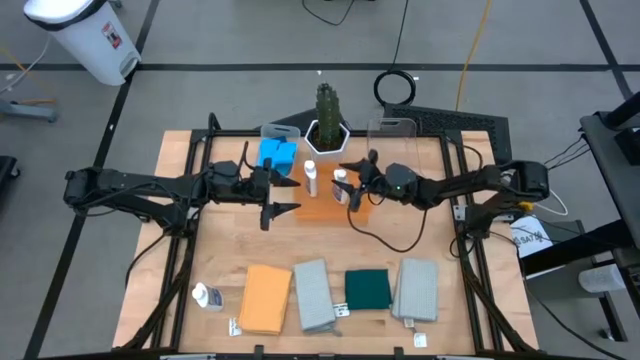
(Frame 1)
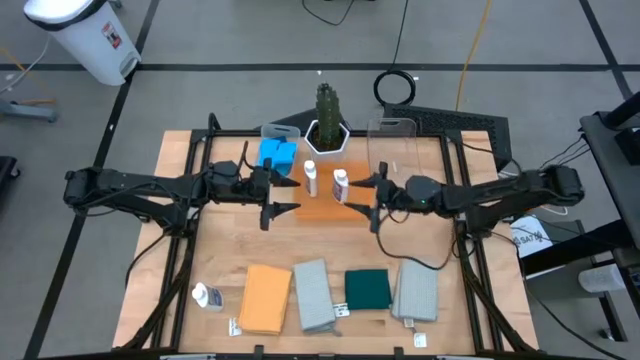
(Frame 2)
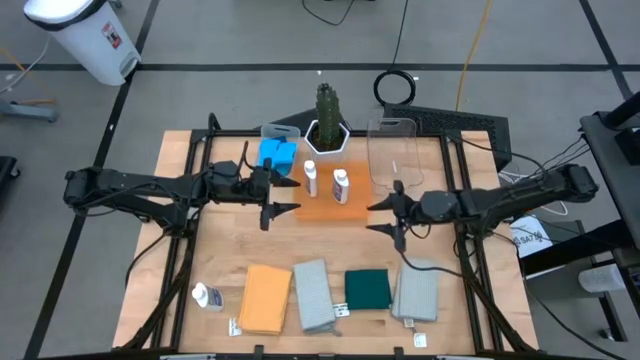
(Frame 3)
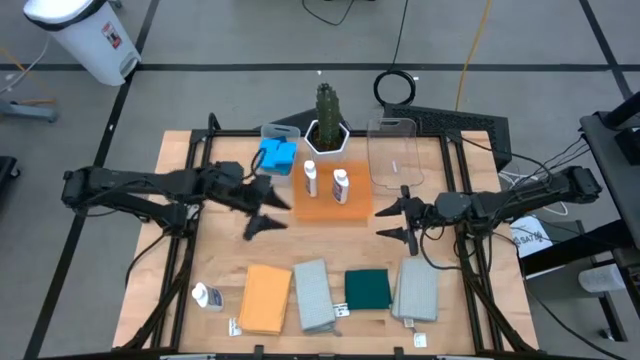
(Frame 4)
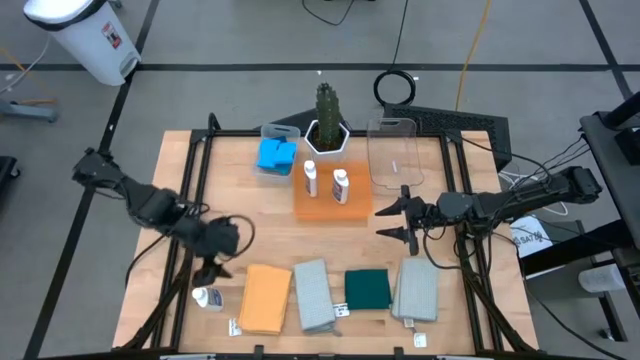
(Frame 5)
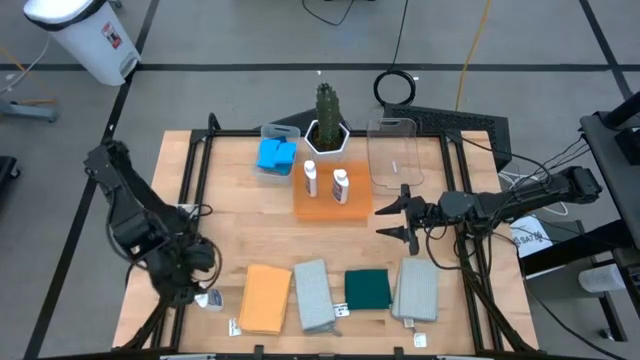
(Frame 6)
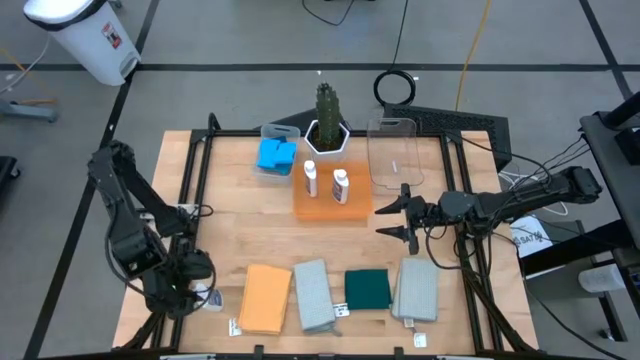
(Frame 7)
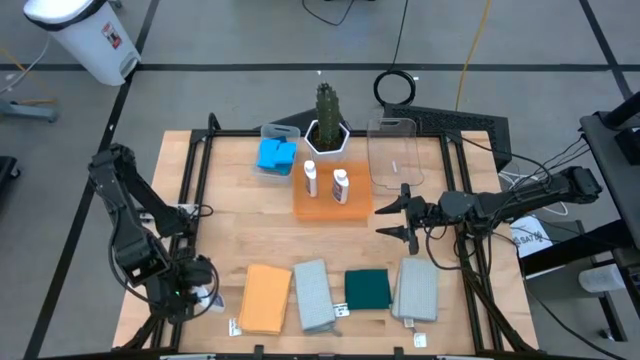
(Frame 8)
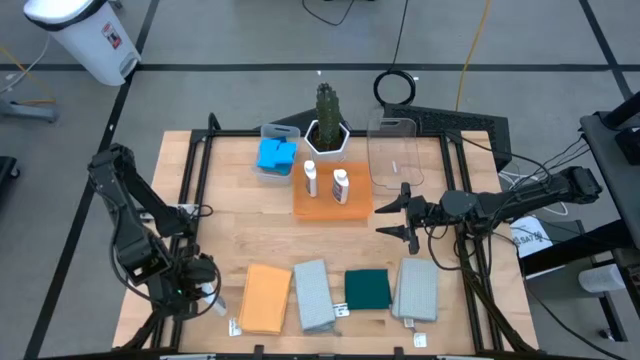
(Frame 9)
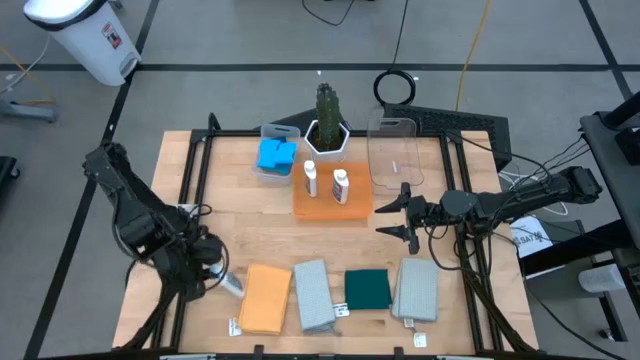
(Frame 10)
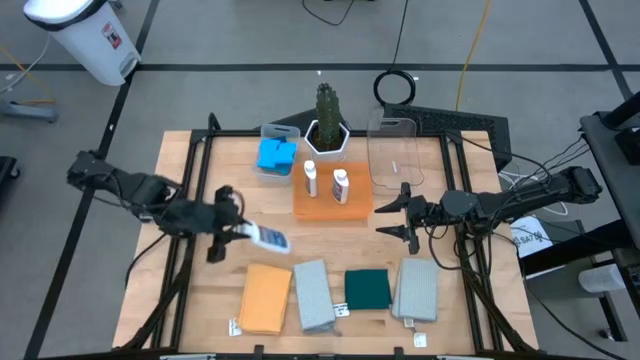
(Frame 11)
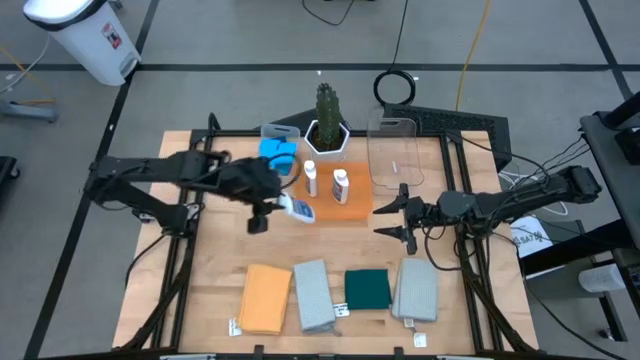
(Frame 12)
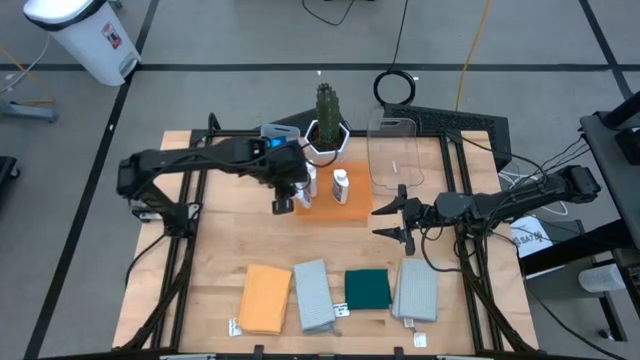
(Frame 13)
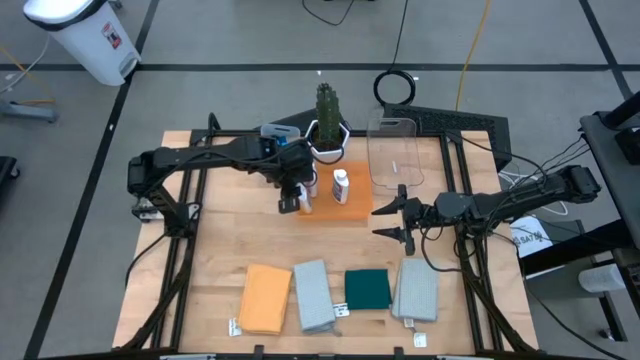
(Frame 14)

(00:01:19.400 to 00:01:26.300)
Task: Pick & Place Kitchen Items
Put the white plastic restorer bottle into the orange bin

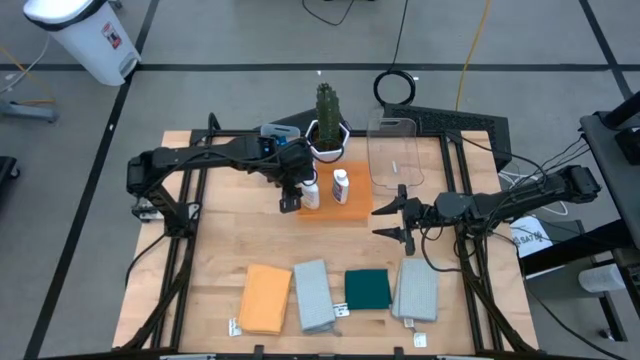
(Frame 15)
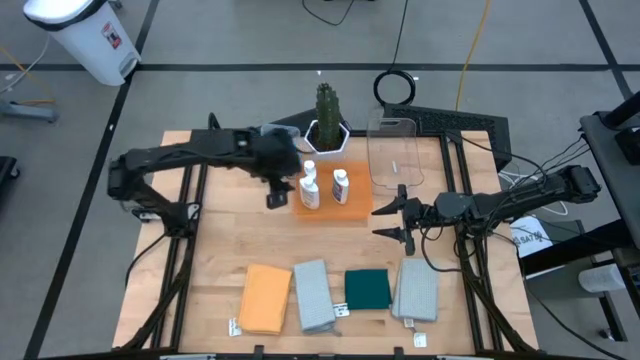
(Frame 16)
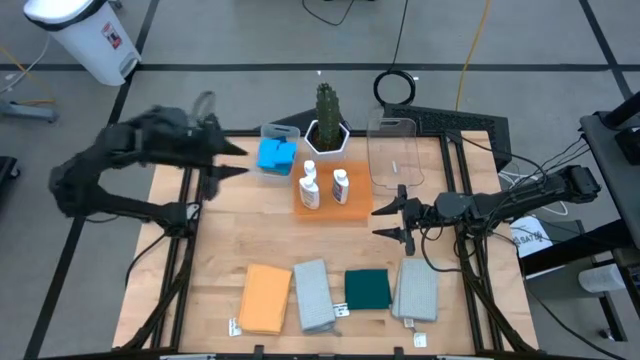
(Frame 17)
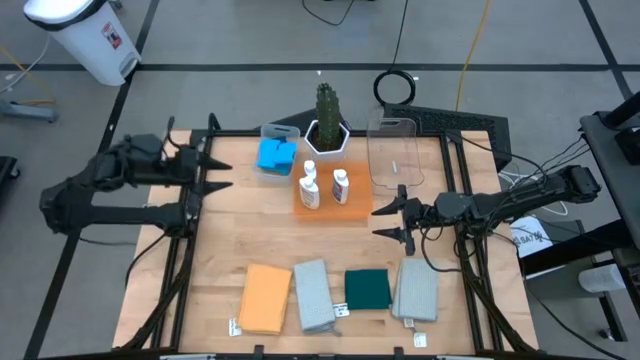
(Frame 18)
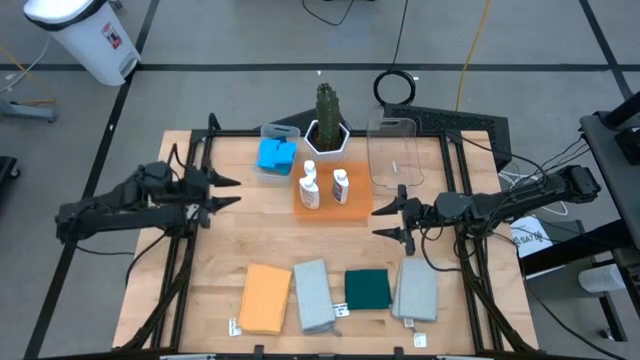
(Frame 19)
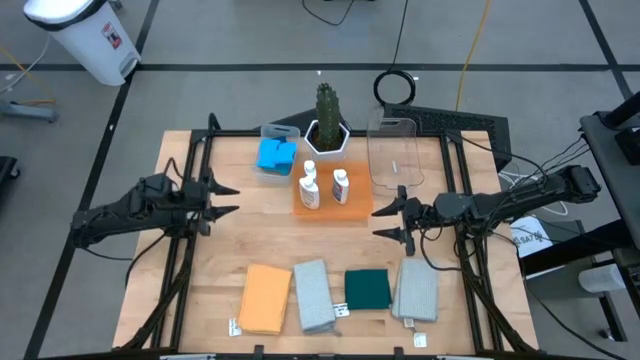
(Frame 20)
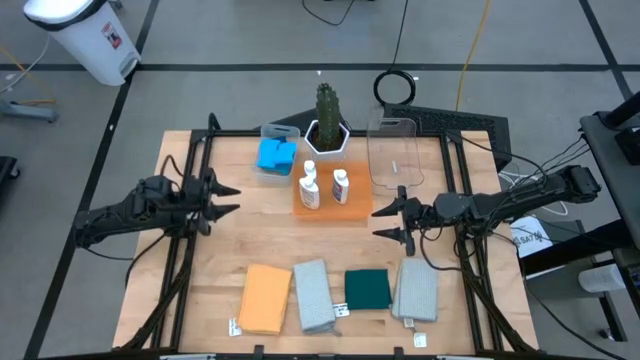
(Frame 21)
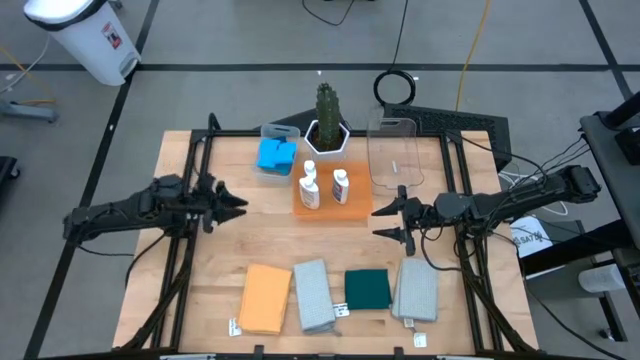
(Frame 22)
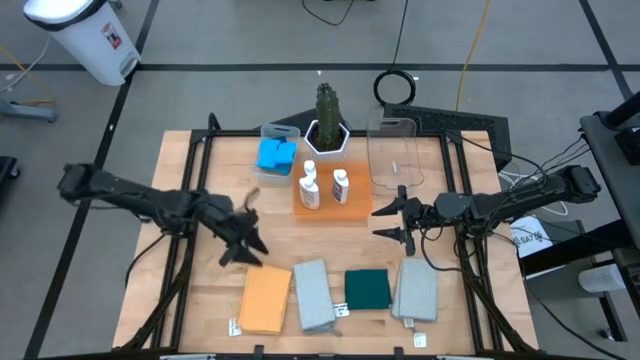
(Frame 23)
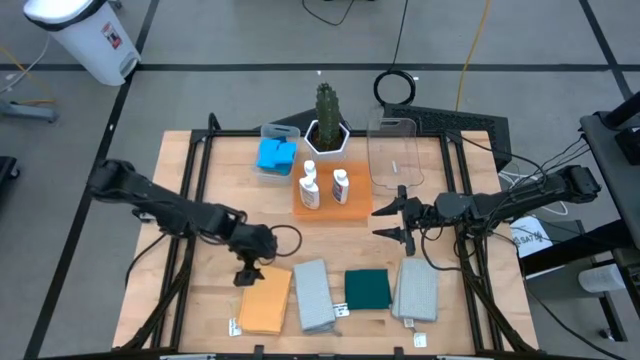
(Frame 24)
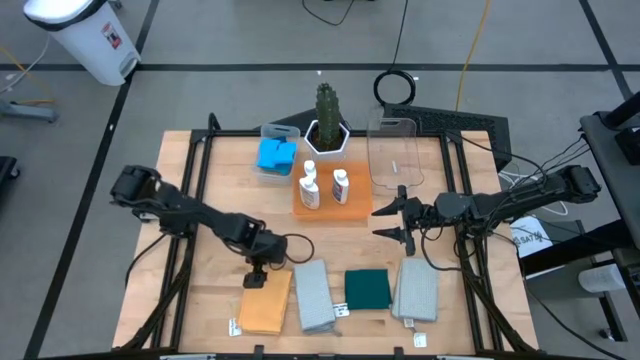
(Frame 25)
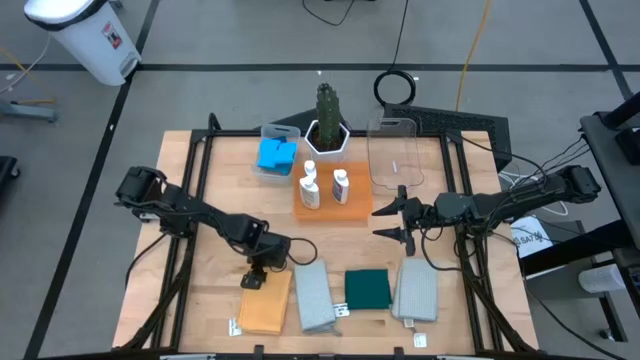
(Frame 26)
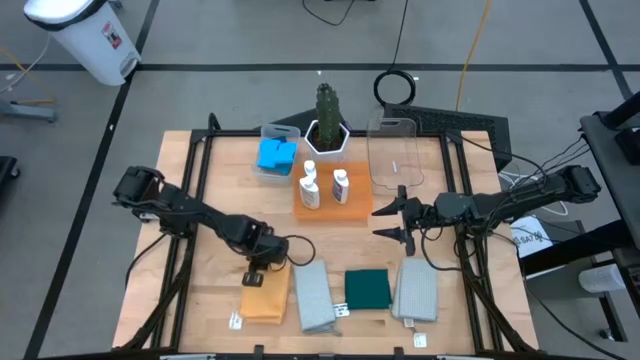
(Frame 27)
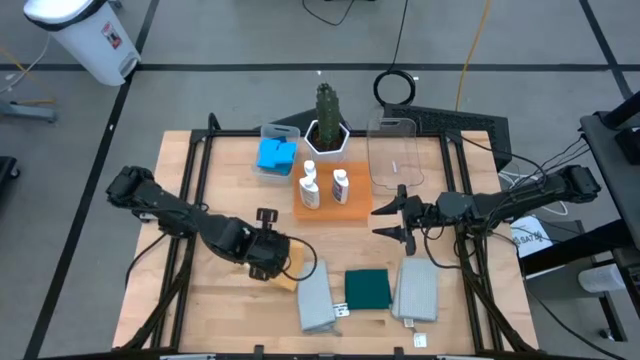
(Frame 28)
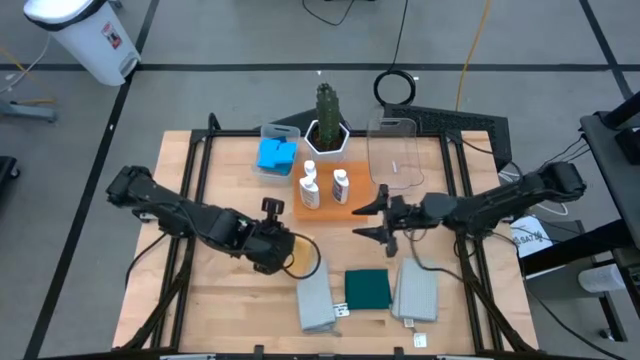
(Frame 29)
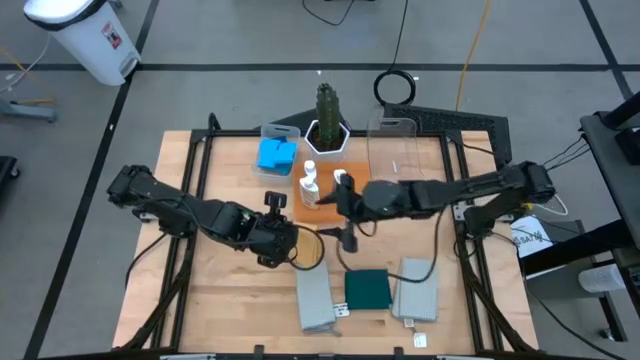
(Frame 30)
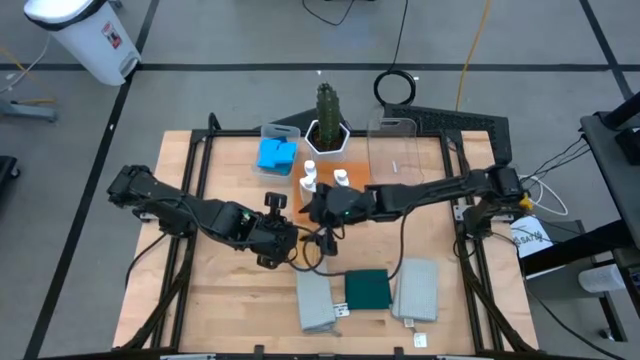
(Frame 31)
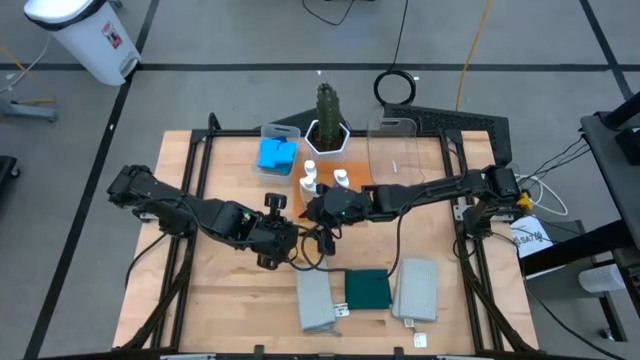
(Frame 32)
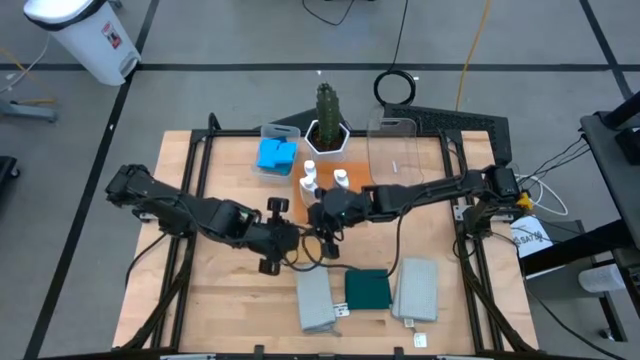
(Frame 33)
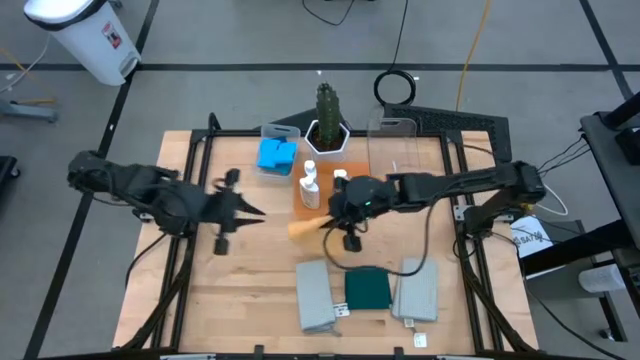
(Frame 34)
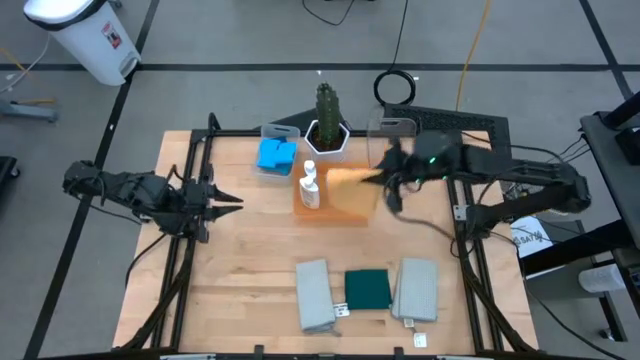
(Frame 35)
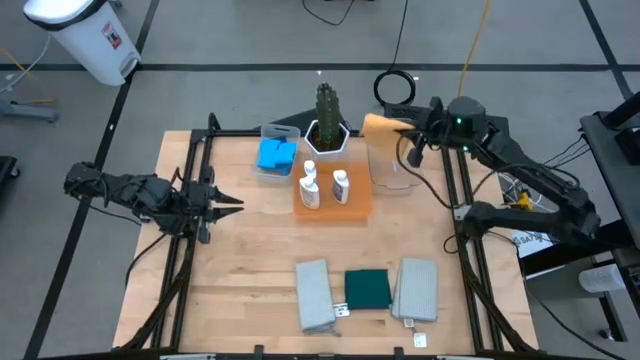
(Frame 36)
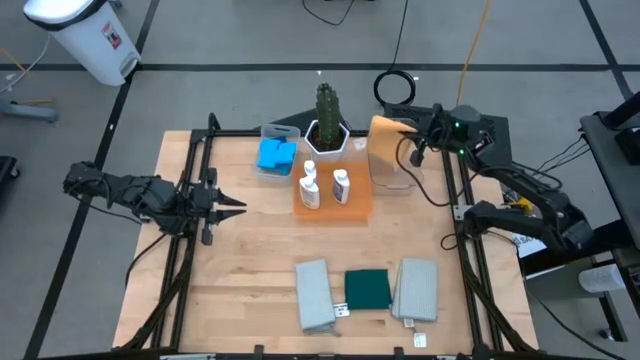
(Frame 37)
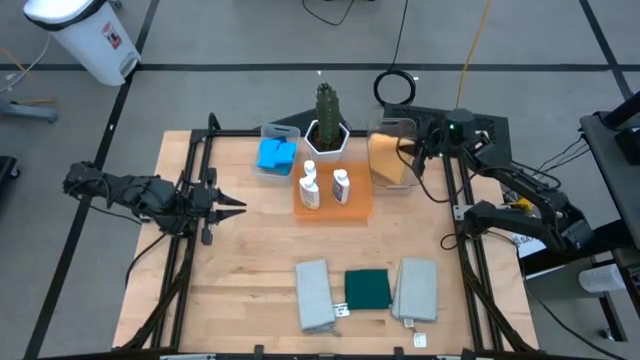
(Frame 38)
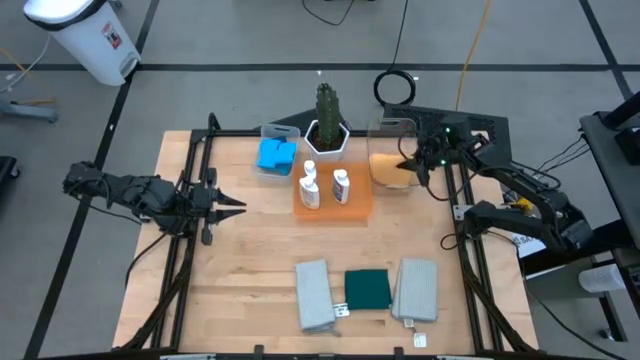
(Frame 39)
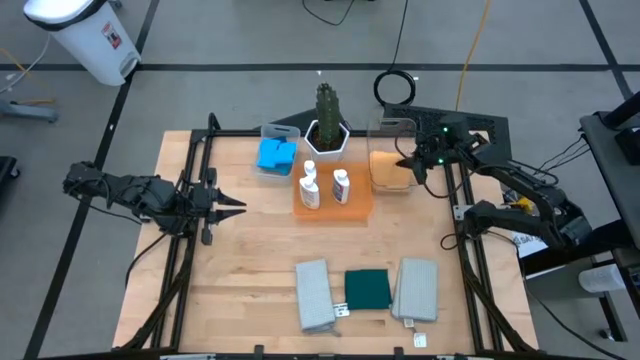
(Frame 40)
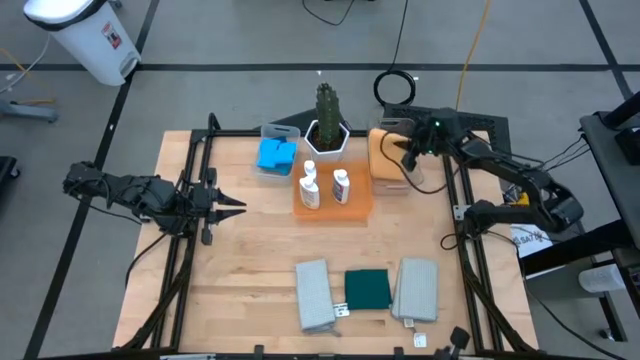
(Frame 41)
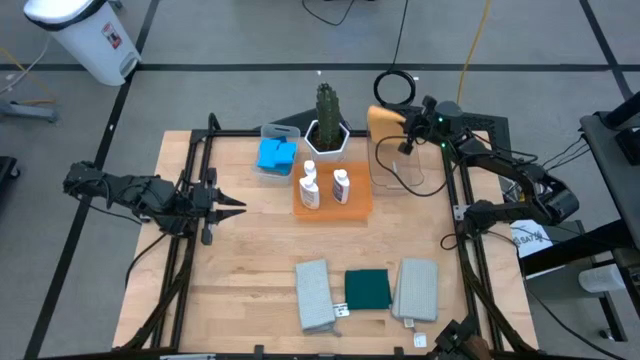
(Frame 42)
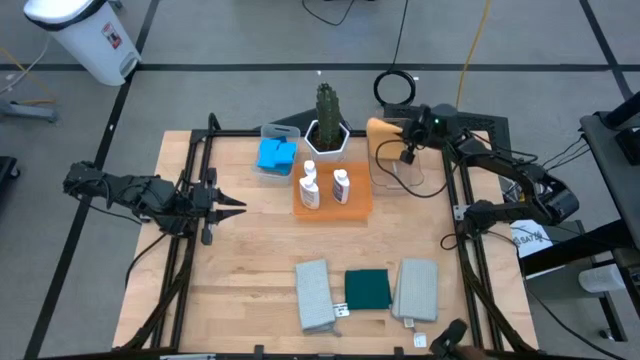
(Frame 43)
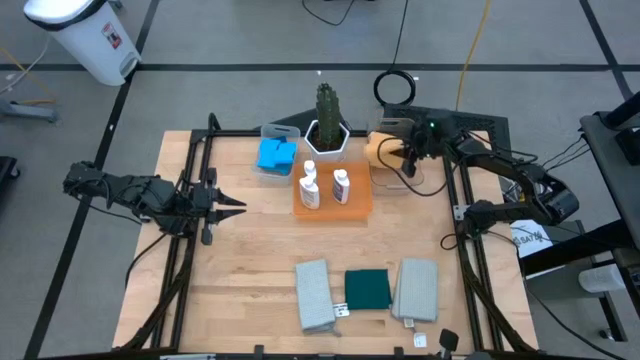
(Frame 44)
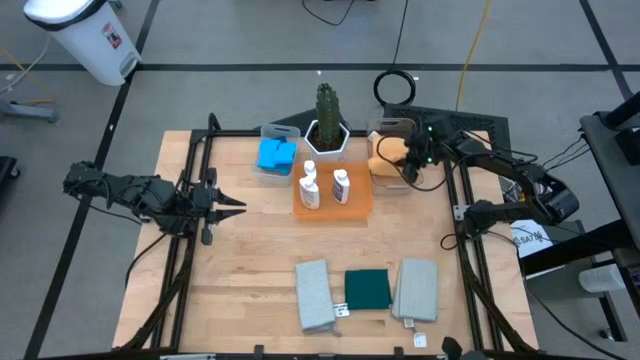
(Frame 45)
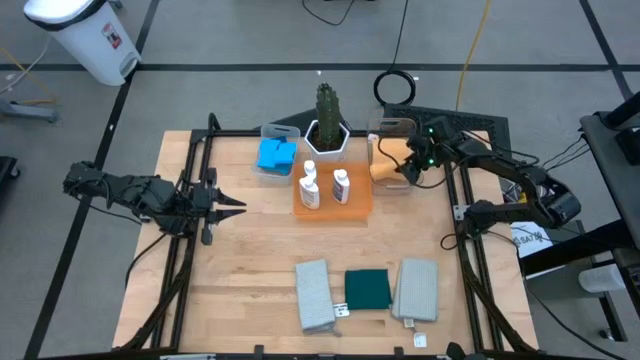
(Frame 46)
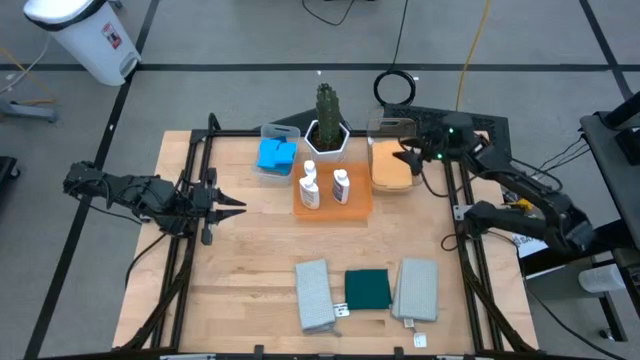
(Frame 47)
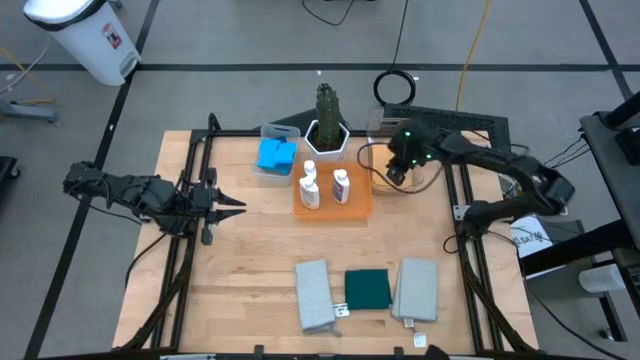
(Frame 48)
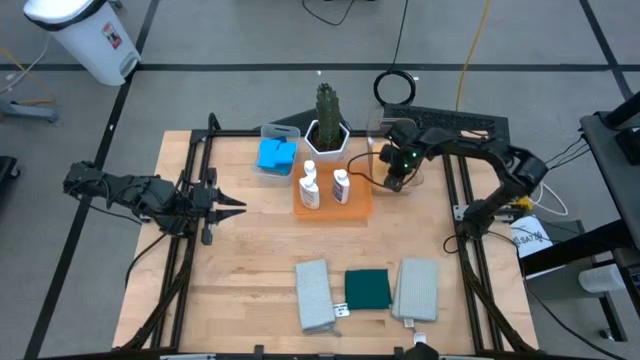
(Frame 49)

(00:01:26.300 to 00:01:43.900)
Put the orange microfiber towel into the transparent bin
